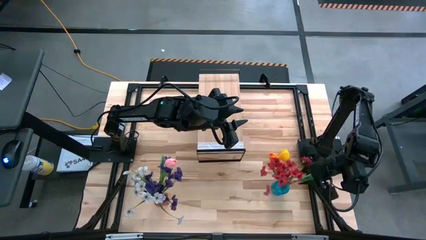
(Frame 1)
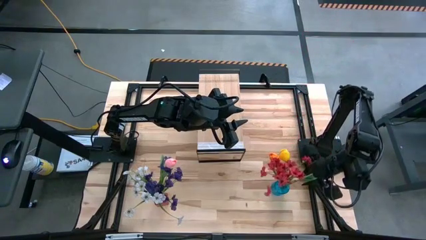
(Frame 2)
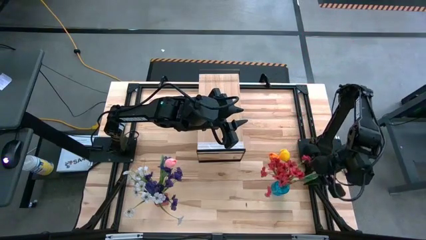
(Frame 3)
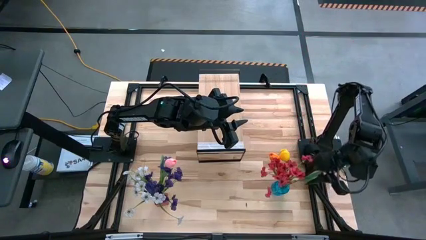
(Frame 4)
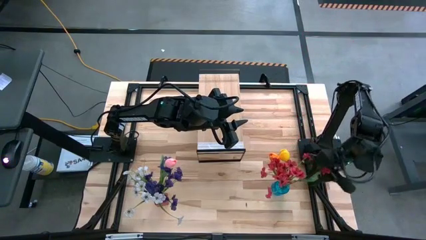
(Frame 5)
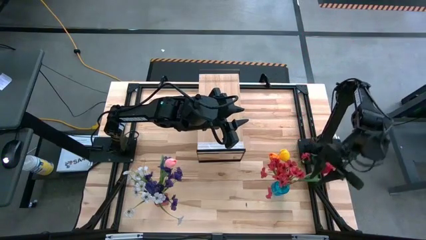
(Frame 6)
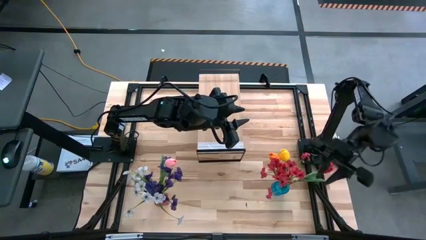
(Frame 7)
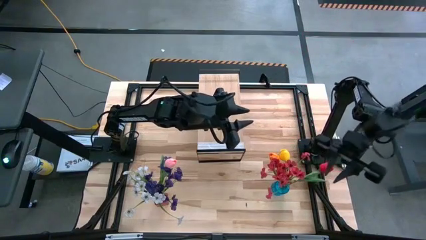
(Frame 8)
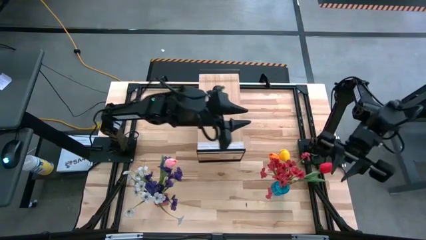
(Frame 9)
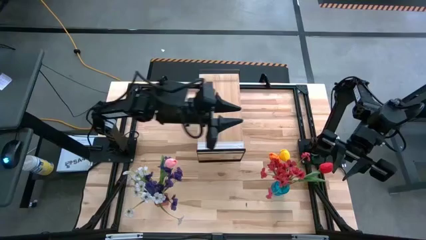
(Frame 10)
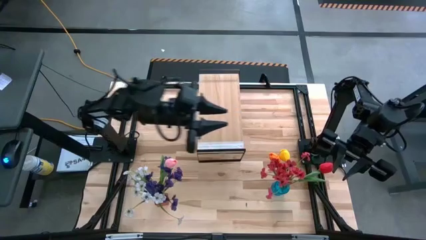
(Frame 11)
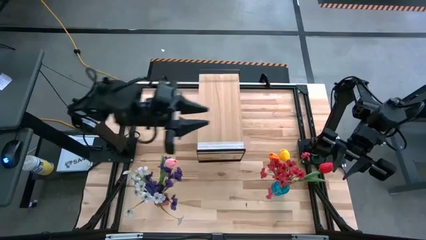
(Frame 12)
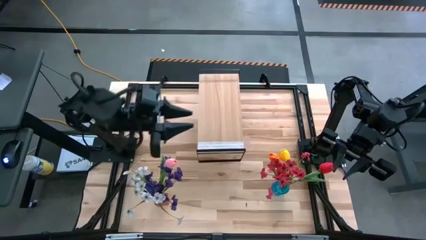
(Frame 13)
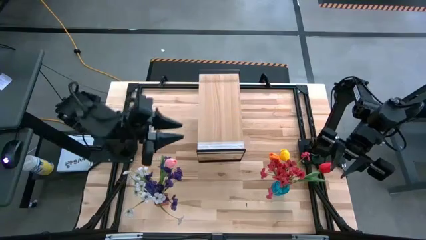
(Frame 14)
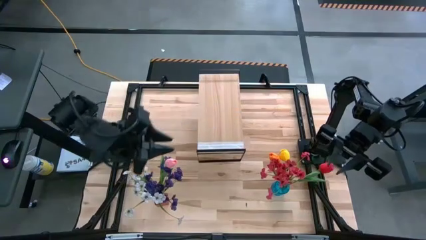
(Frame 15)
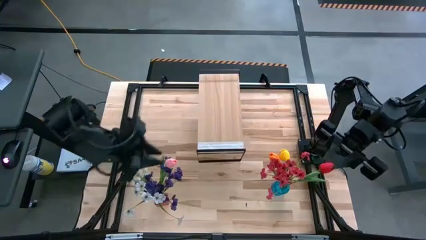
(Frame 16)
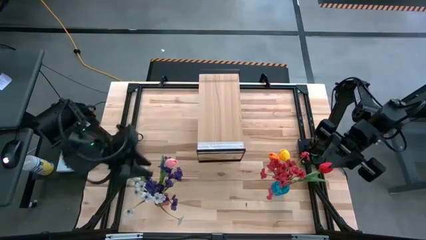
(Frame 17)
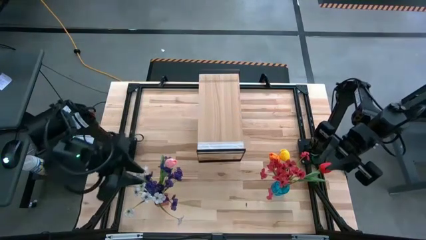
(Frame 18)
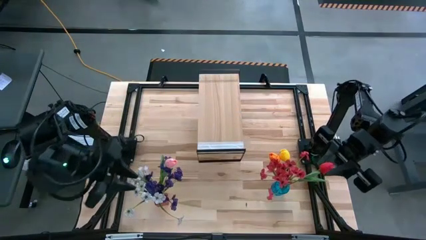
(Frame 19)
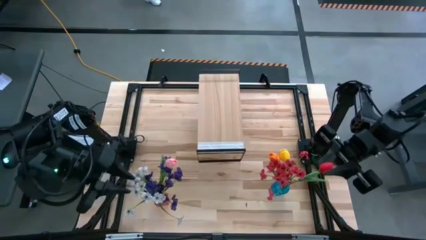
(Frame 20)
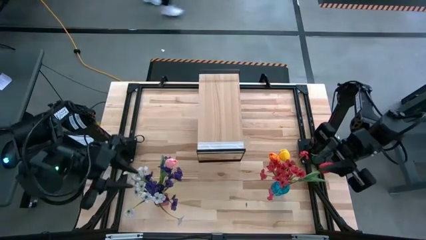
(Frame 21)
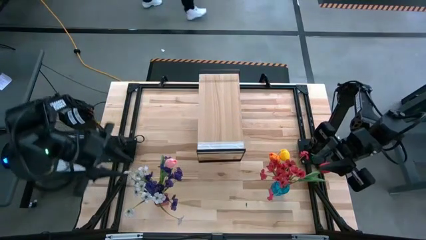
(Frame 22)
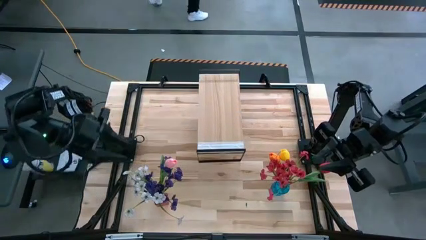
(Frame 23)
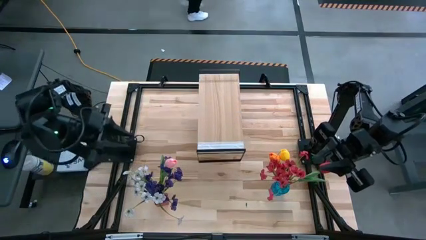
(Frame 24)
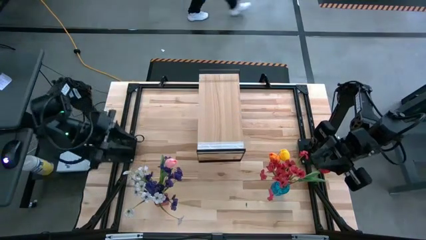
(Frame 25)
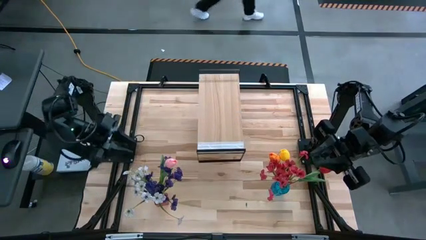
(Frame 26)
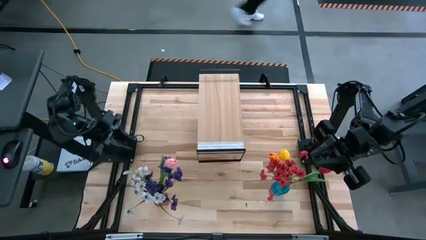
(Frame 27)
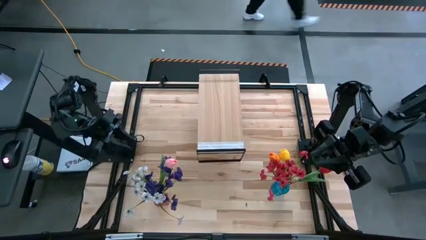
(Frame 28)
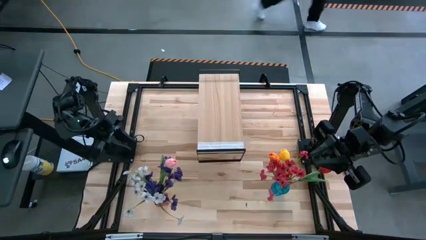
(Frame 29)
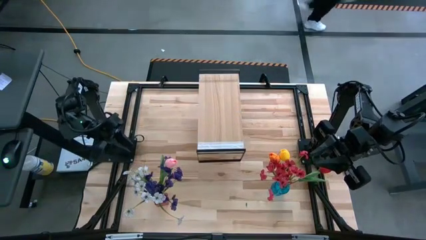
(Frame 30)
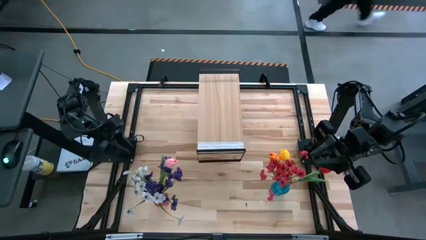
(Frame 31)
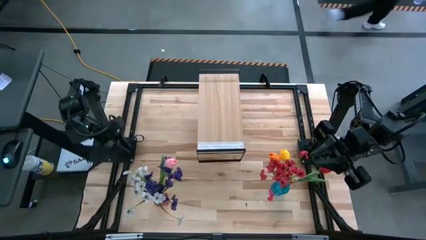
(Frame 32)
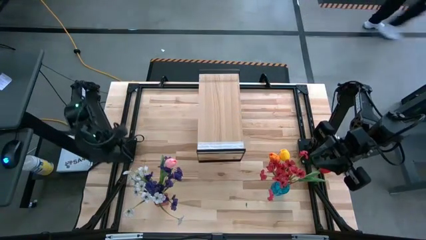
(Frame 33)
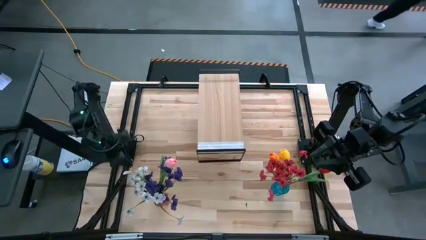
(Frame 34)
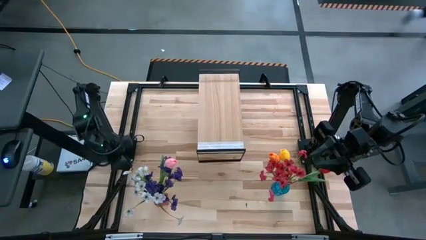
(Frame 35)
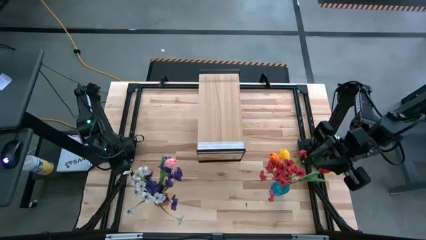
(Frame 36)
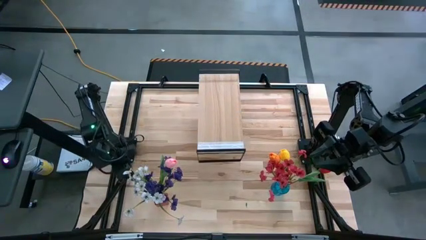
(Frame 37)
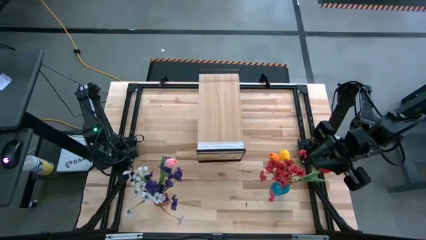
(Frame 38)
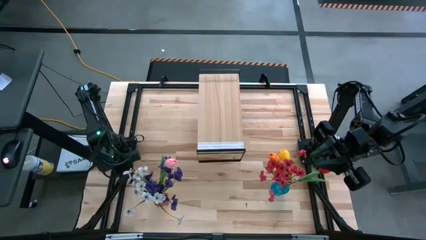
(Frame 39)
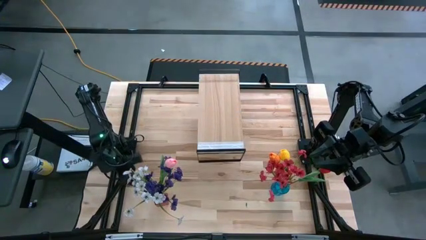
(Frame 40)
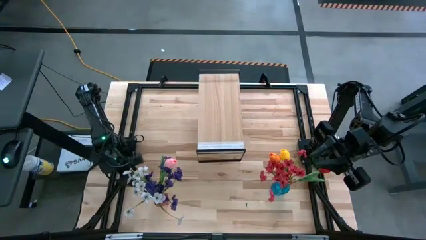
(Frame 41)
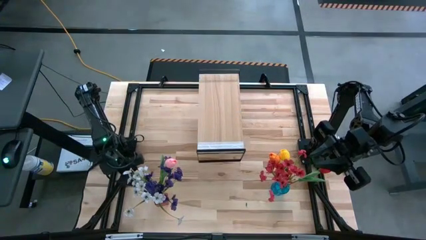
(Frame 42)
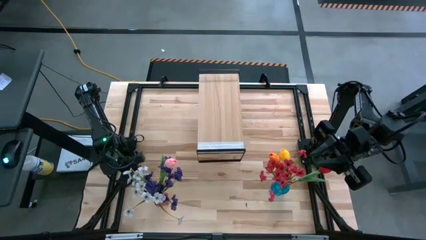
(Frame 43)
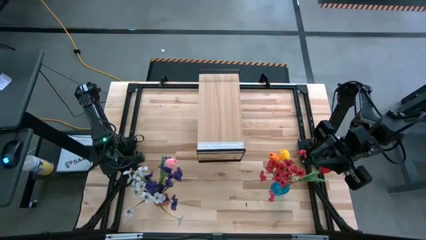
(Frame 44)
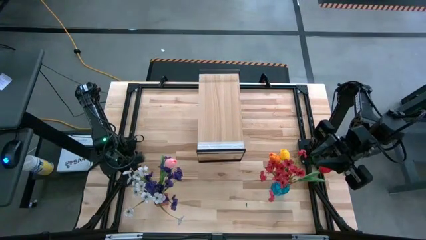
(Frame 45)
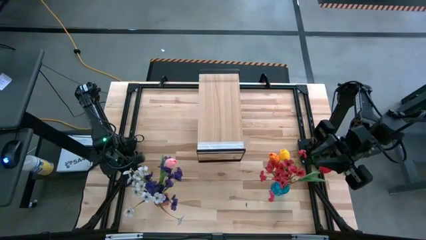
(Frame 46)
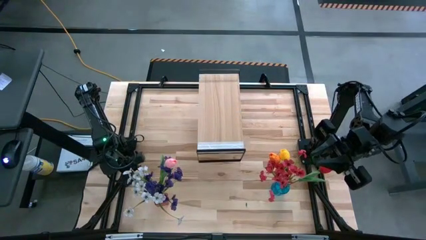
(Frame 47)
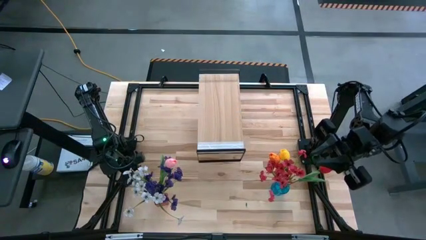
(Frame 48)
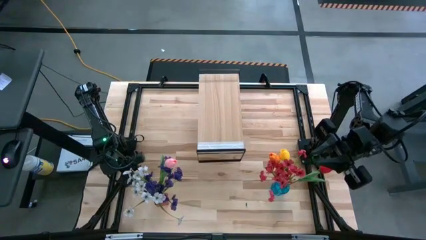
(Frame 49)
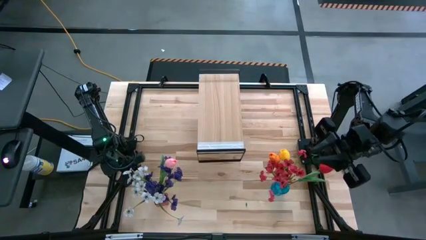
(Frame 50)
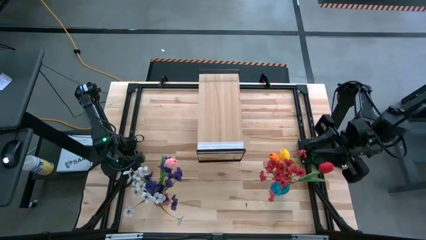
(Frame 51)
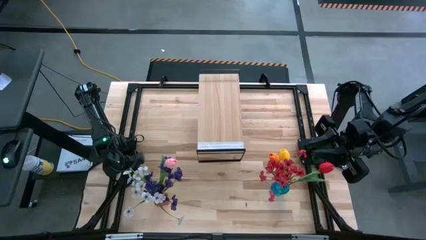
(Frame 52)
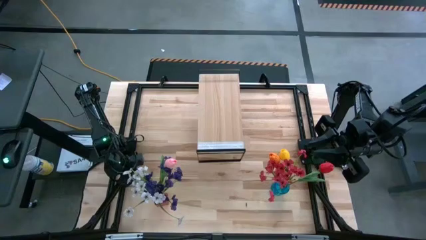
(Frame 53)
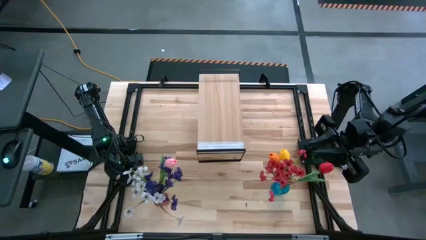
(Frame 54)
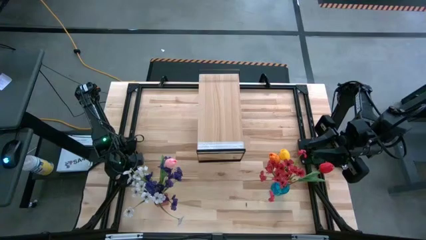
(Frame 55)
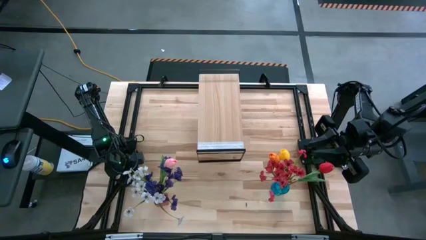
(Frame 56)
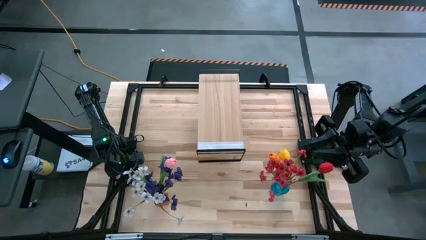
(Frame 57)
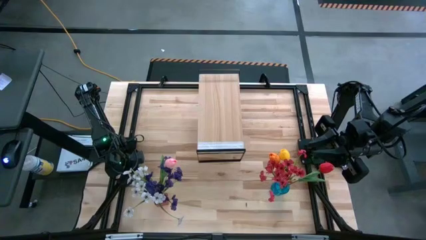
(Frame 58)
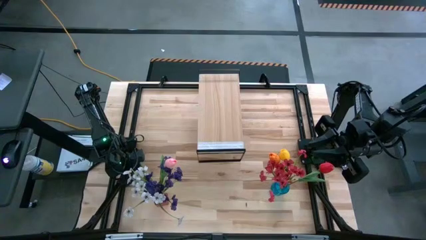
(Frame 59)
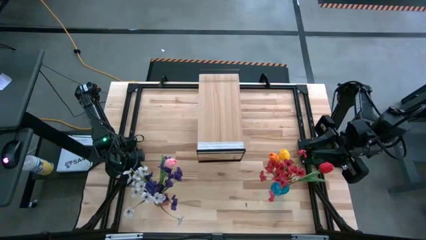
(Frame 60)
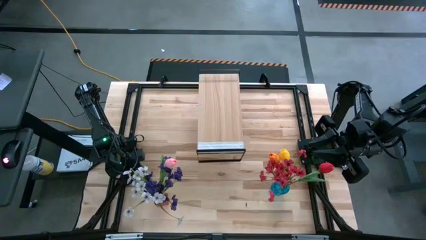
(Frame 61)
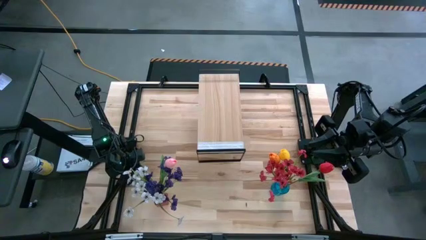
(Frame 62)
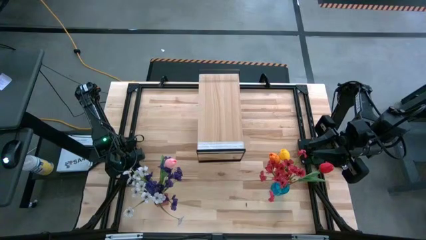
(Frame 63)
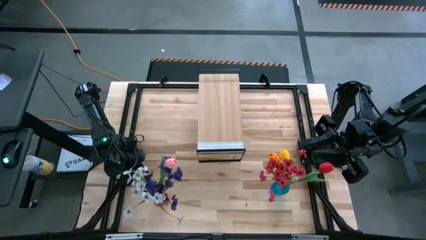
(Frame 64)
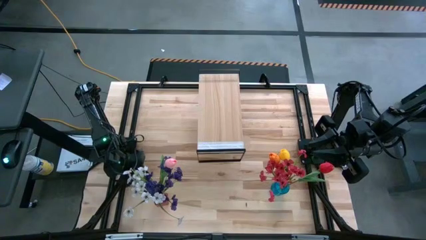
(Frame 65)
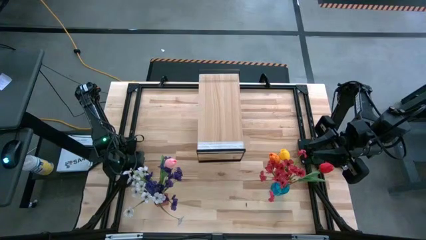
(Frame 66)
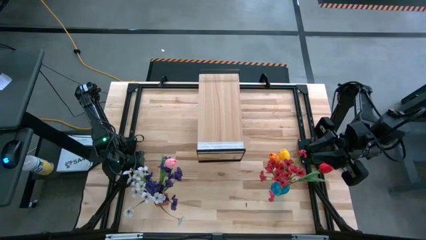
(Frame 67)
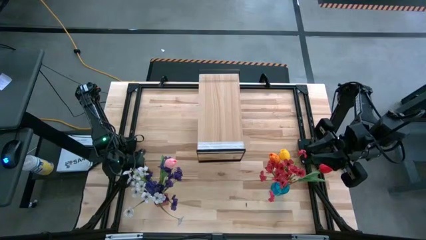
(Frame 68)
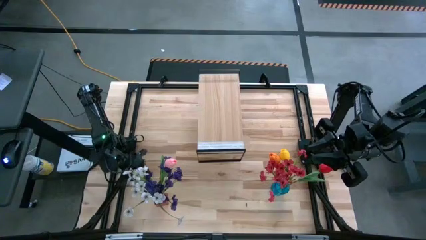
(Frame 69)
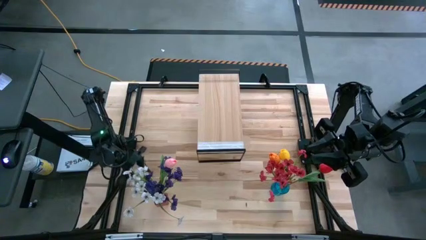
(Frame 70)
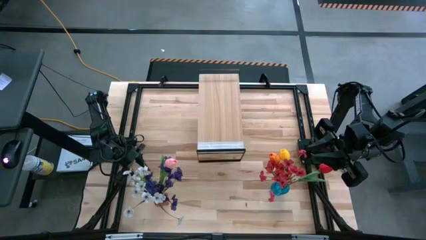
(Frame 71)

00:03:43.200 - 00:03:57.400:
Task: Pick and place flowers into a vace then onto a shelf
Put the red vase with flowers on the shelf
